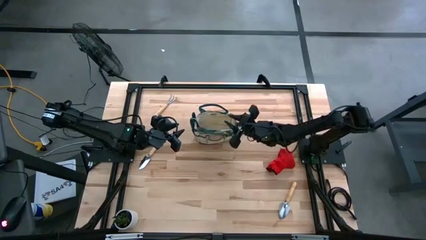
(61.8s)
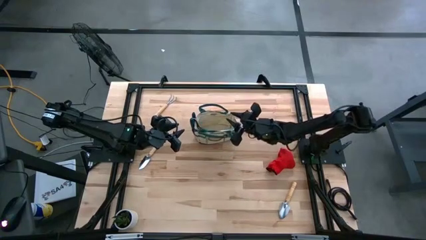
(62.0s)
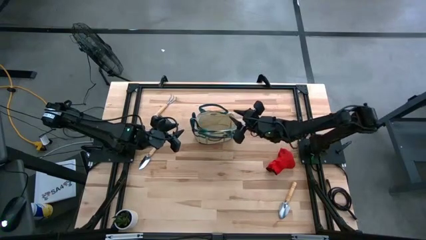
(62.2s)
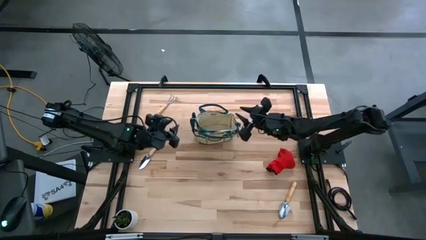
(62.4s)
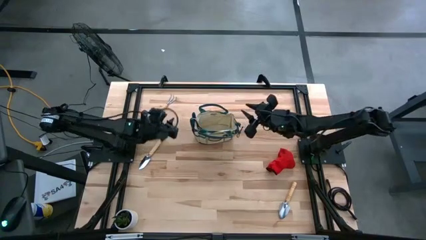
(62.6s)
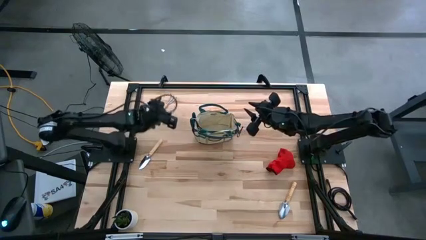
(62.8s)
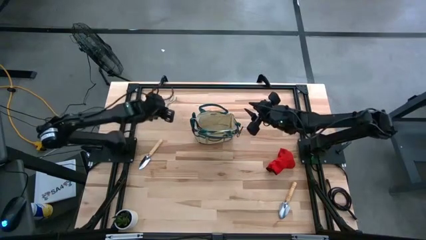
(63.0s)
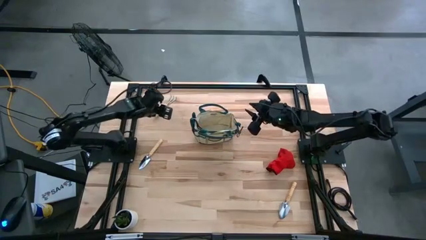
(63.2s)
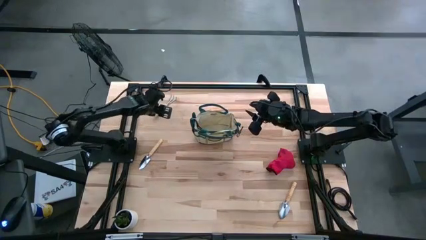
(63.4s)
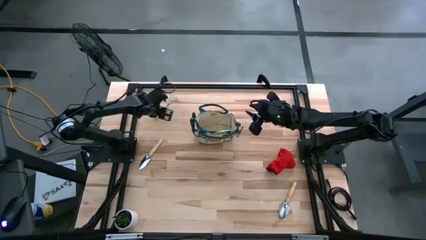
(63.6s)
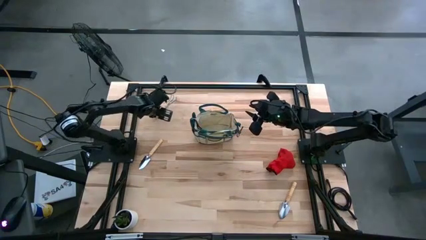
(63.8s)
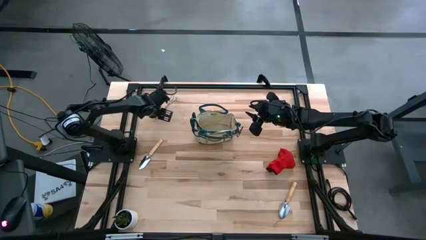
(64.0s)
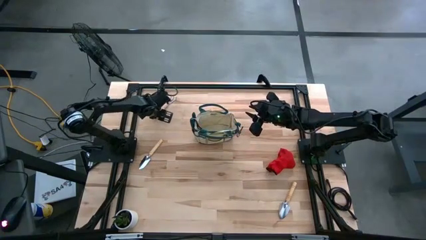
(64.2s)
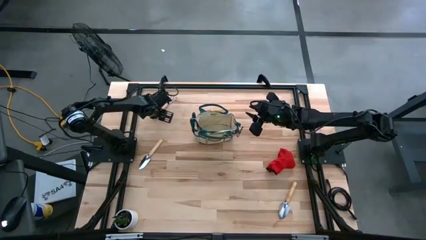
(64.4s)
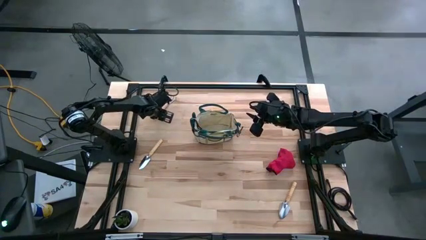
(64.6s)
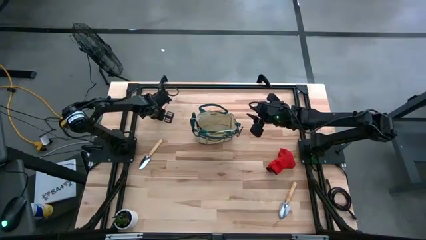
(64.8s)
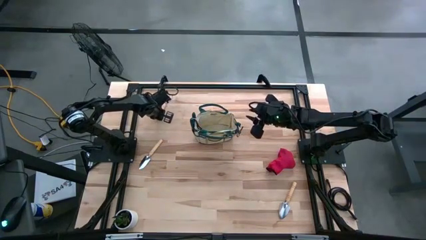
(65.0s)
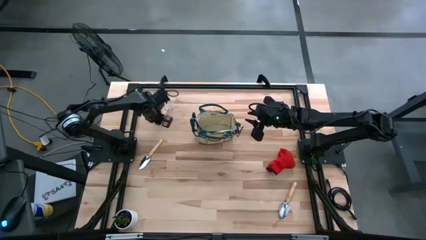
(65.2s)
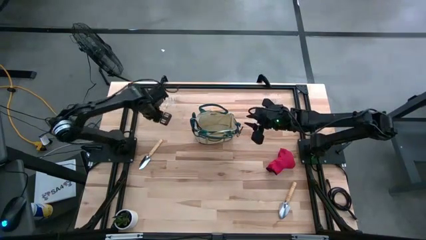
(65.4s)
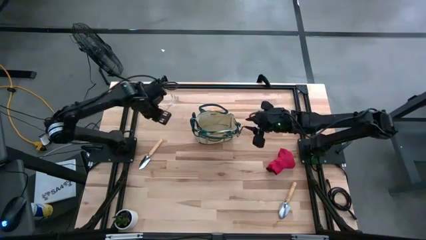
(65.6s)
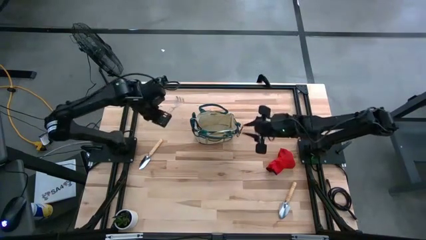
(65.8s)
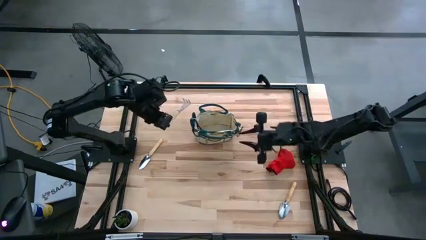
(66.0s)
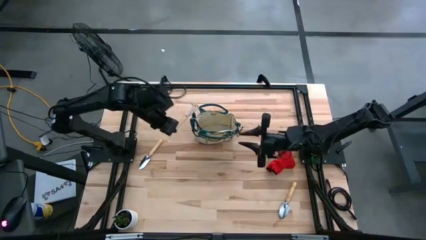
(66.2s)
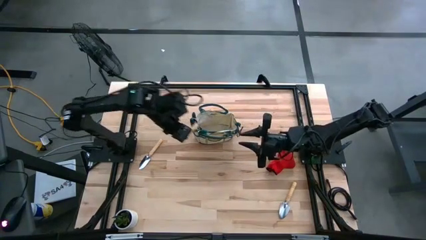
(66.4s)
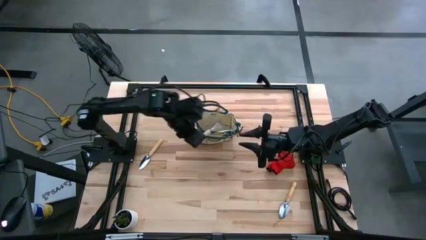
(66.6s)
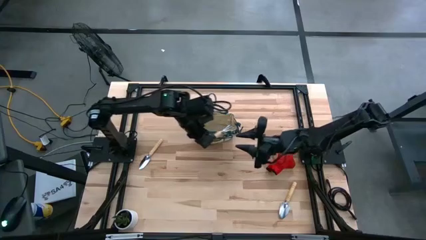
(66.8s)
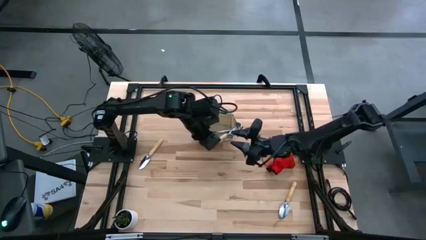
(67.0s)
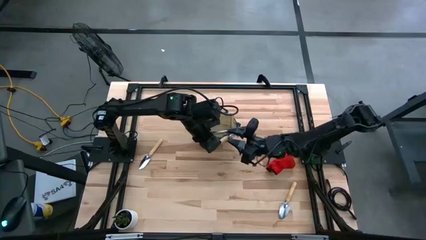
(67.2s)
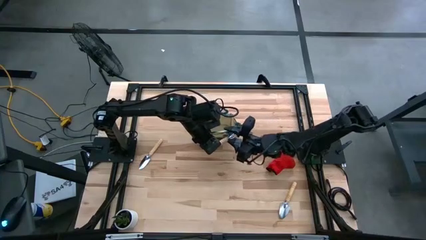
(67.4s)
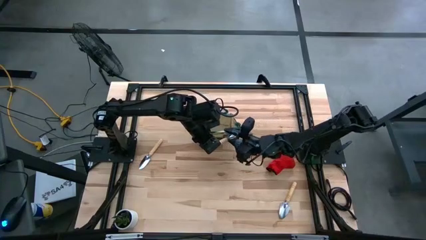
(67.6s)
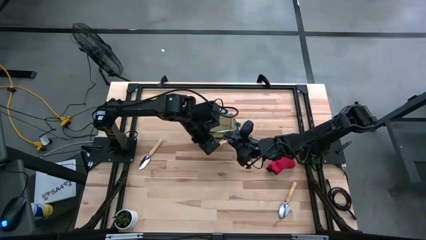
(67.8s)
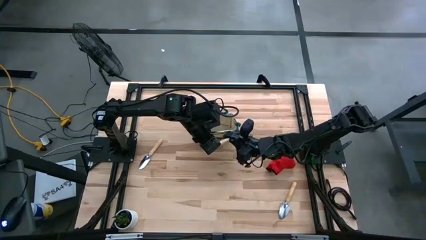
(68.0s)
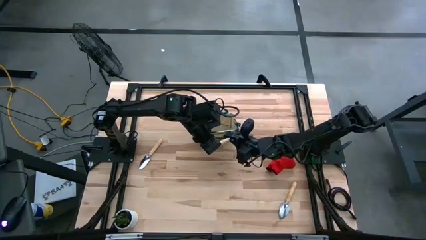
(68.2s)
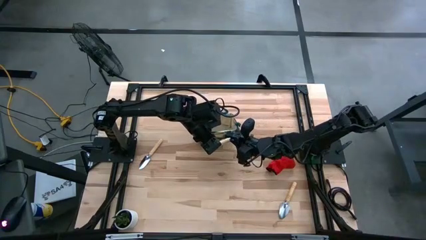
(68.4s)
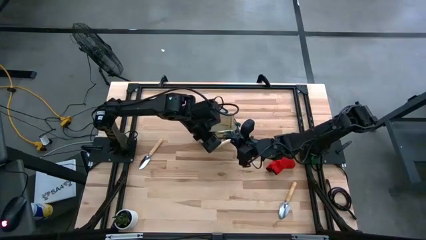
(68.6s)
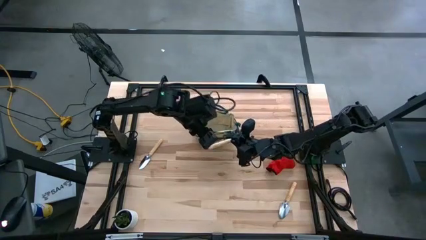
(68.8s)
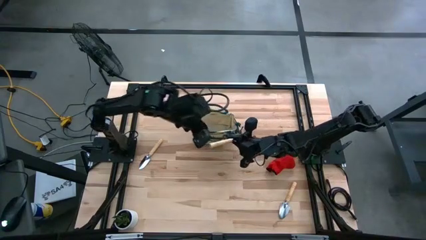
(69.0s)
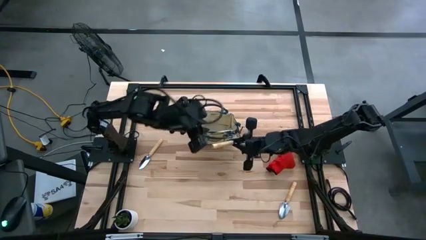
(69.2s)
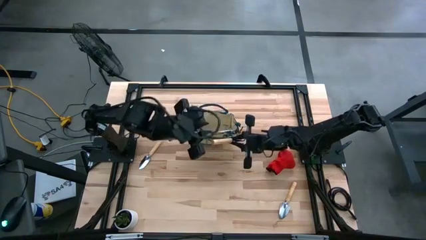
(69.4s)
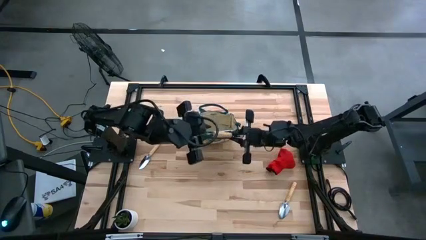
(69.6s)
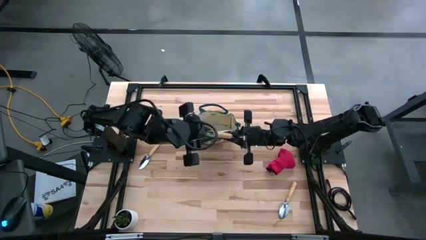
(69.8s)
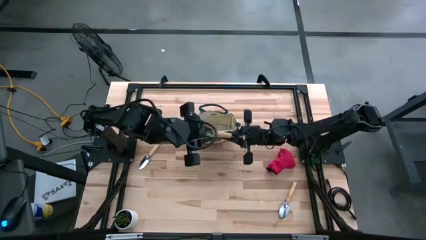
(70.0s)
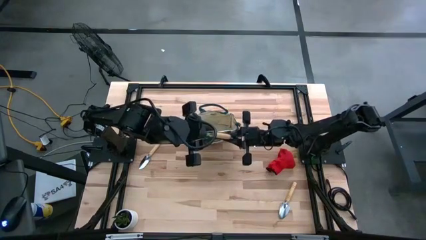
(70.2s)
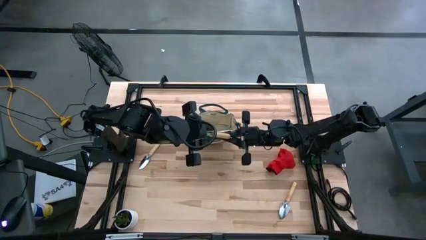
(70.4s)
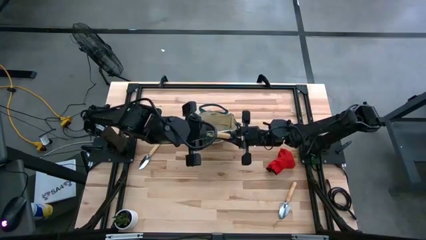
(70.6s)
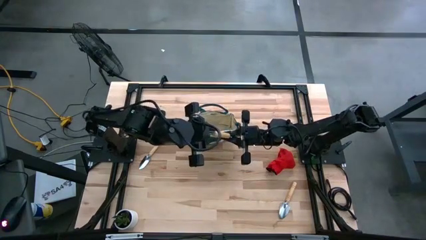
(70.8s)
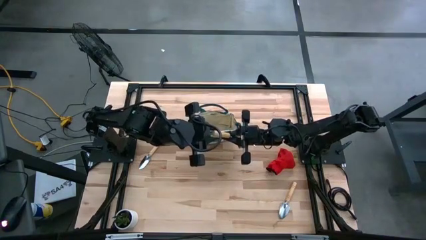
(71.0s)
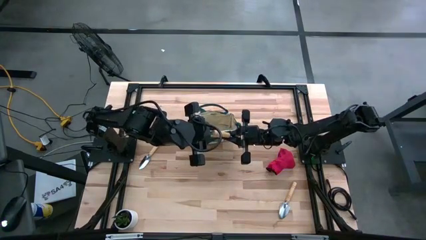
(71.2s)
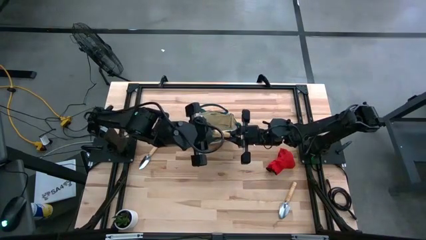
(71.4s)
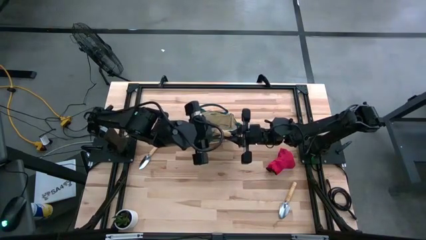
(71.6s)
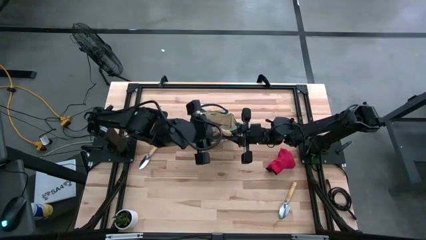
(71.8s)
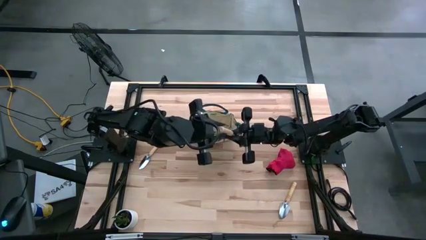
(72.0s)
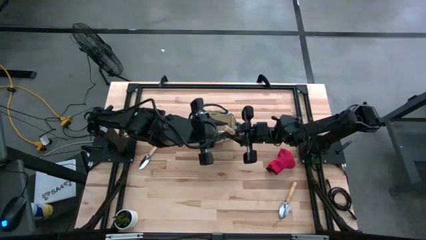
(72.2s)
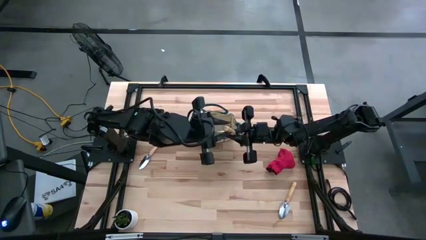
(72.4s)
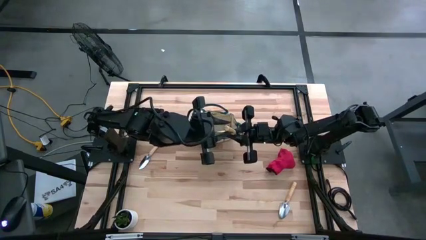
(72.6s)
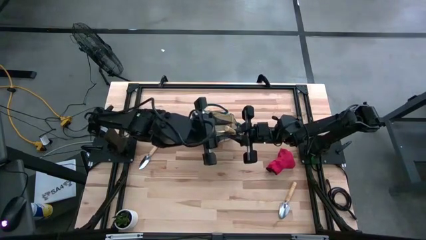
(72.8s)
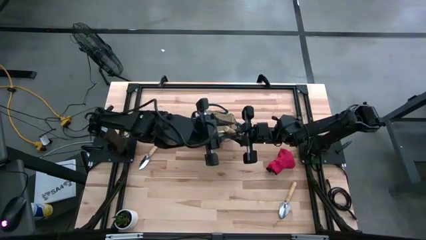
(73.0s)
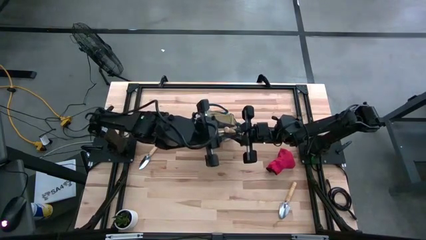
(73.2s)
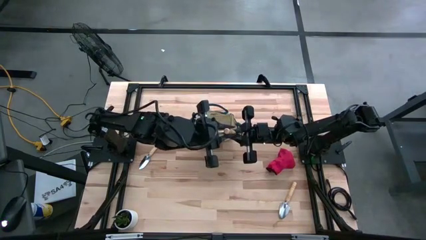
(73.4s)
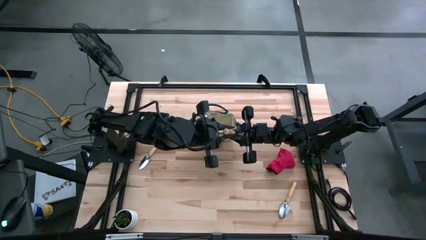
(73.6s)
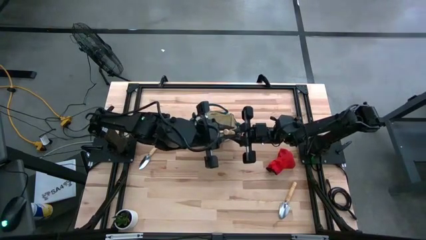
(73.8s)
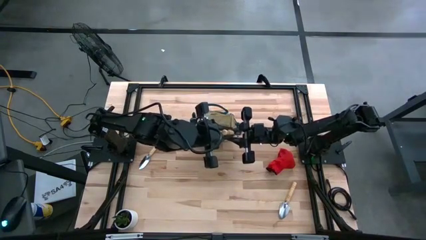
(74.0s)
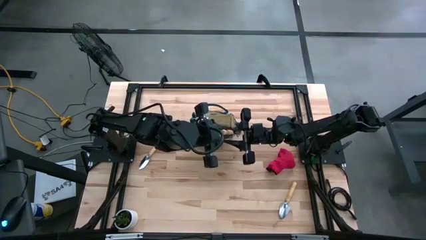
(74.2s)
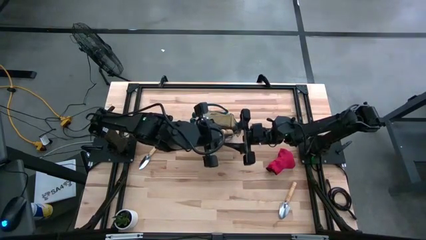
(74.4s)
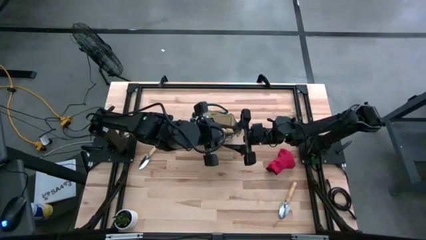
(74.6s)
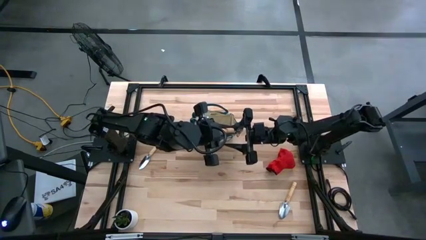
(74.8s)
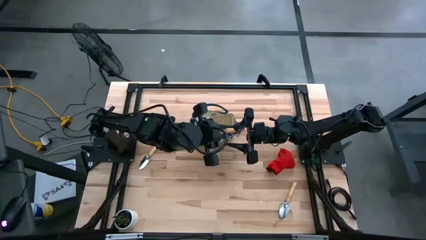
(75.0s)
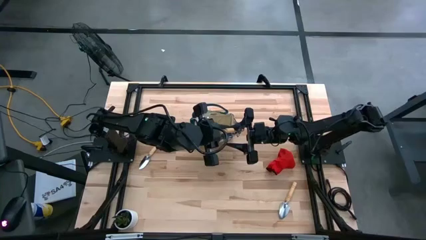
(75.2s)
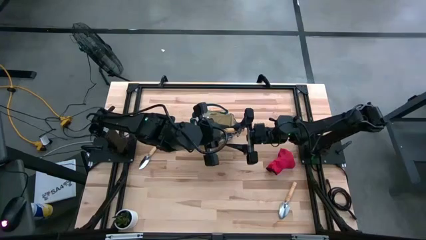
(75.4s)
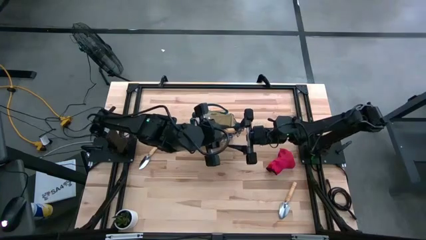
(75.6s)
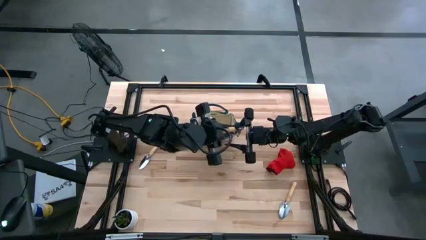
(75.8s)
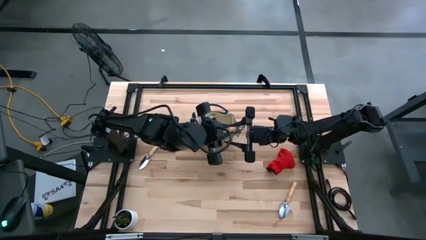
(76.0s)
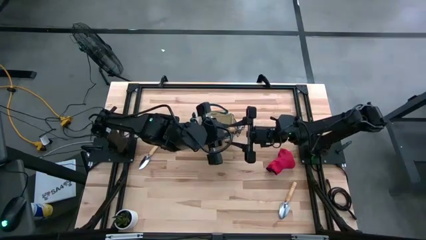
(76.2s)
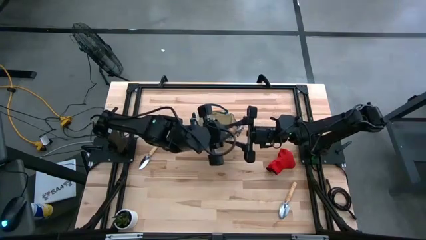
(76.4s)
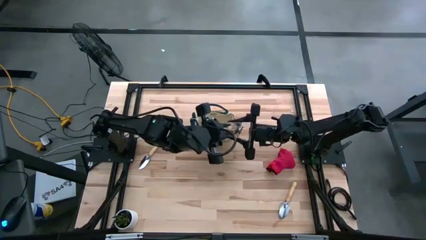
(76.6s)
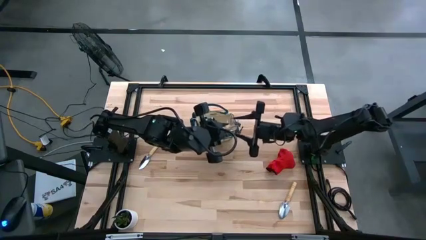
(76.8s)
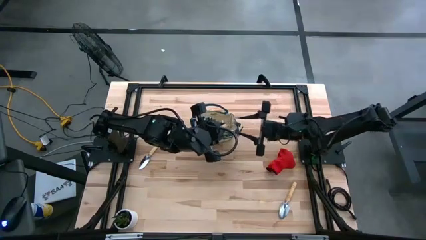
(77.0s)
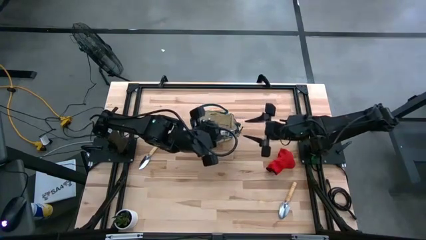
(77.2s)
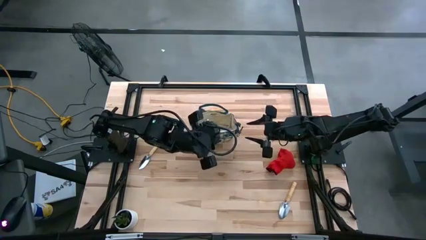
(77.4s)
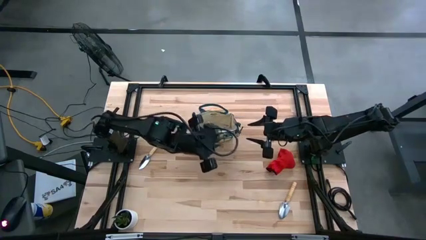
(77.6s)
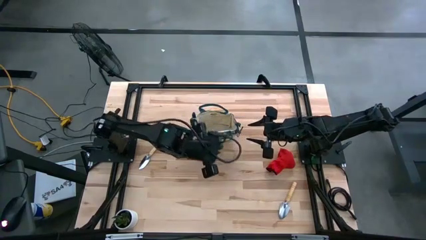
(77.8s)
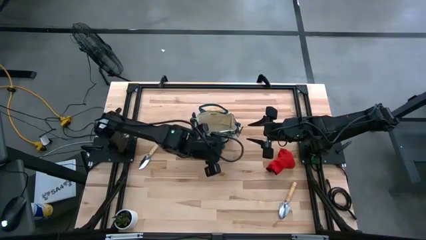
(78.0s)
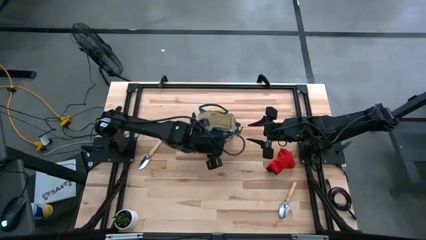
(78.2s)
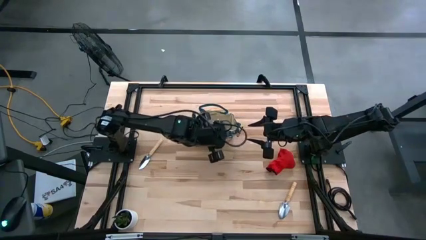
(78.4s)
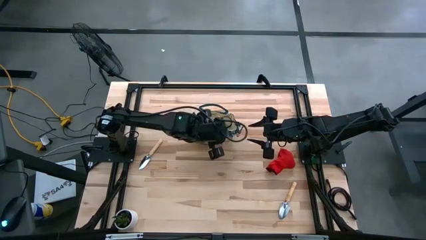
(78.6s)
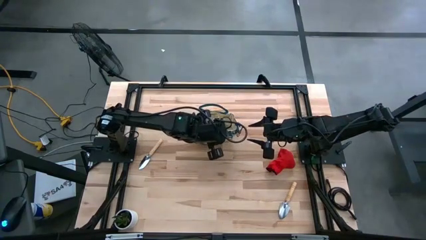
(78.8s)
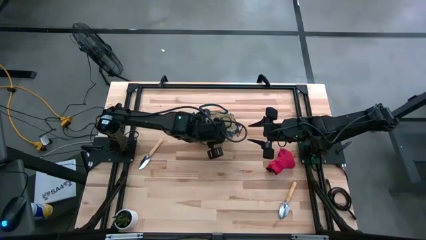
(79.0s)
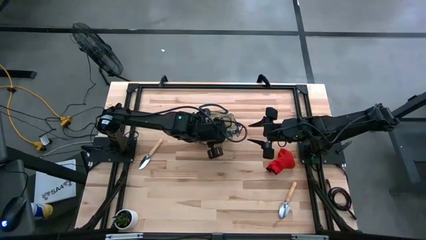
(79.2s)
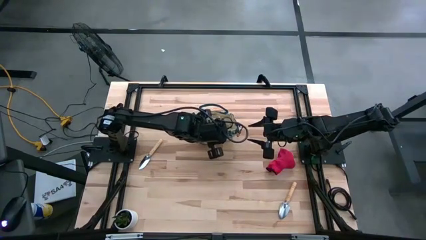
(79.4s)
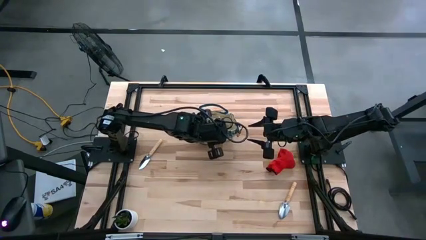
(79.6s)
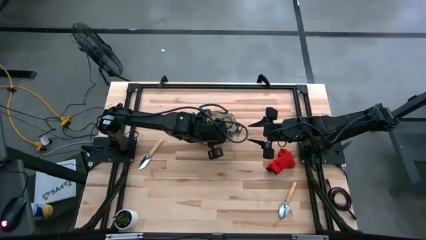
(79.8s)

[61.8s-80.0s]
Task: Pick & Place Garden tools in Gardening bag
Put the hand rake into the gardening bag
